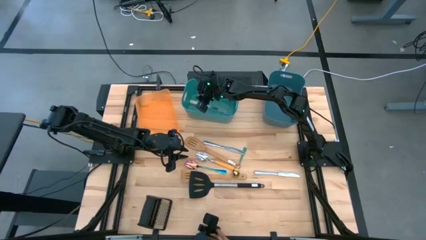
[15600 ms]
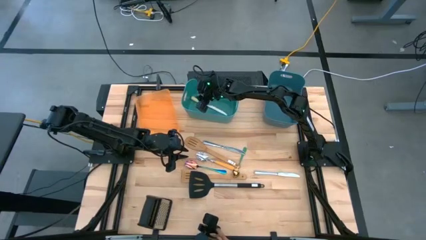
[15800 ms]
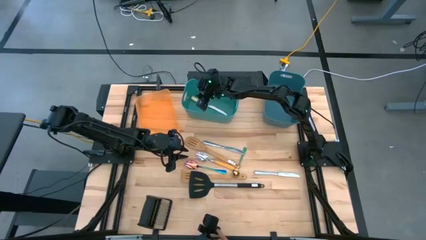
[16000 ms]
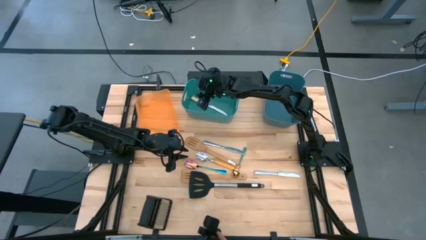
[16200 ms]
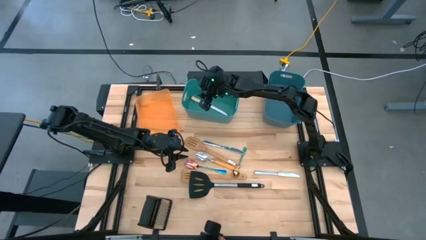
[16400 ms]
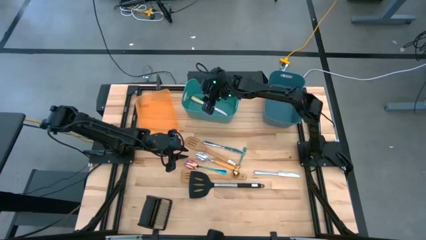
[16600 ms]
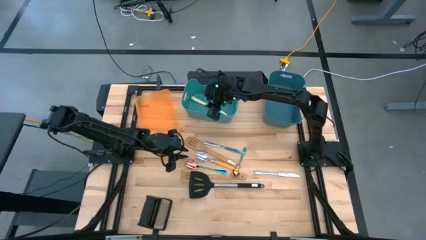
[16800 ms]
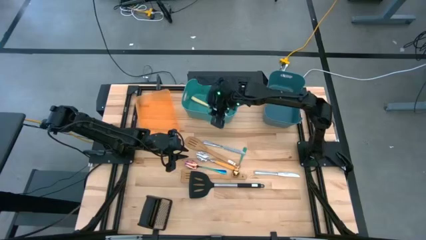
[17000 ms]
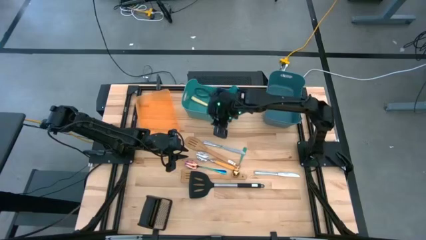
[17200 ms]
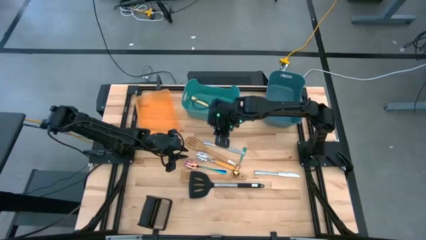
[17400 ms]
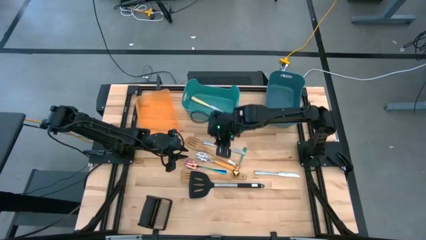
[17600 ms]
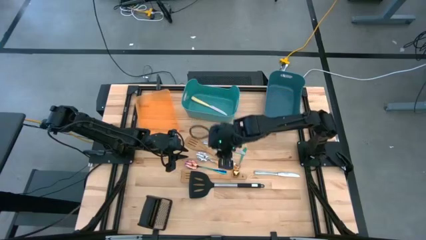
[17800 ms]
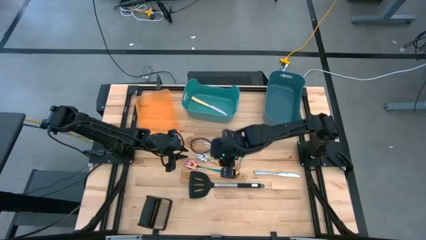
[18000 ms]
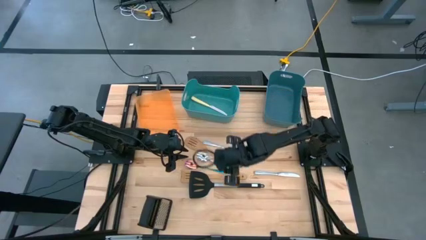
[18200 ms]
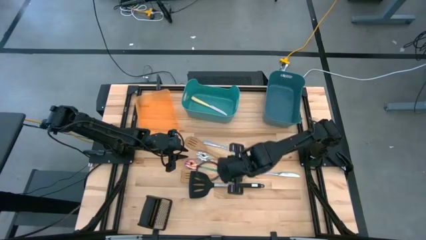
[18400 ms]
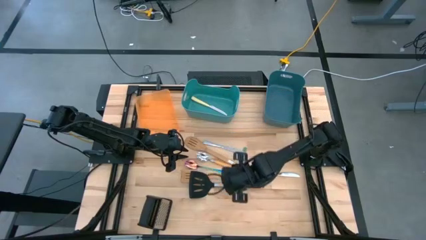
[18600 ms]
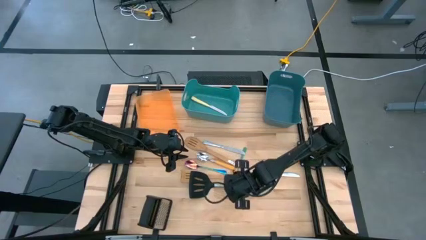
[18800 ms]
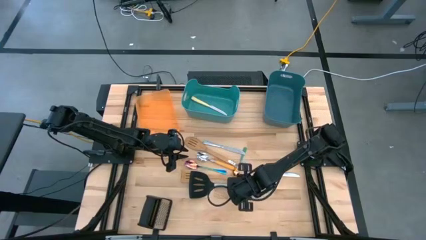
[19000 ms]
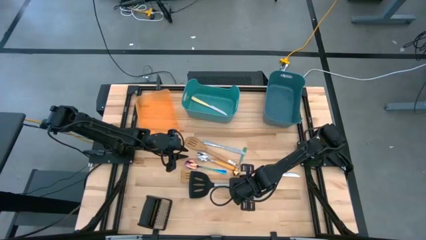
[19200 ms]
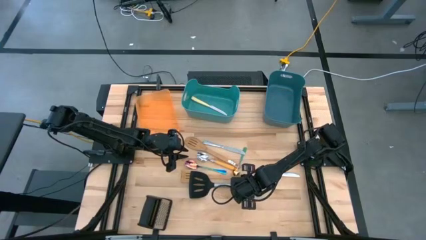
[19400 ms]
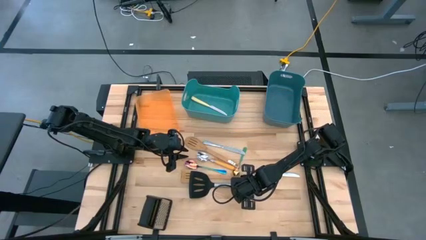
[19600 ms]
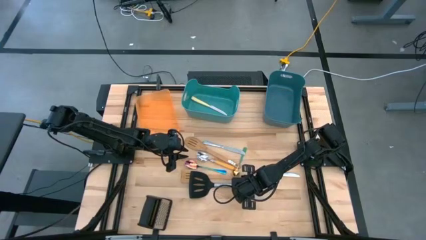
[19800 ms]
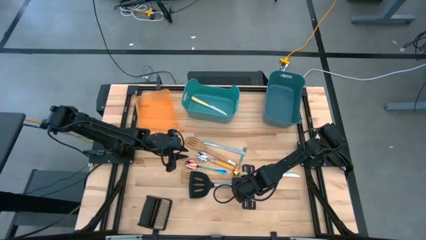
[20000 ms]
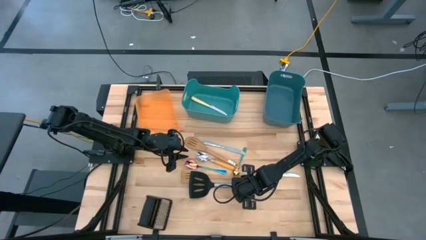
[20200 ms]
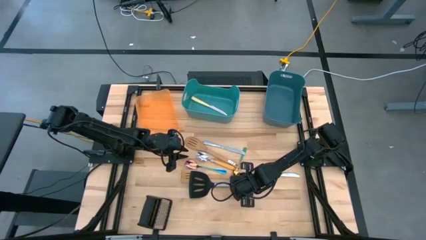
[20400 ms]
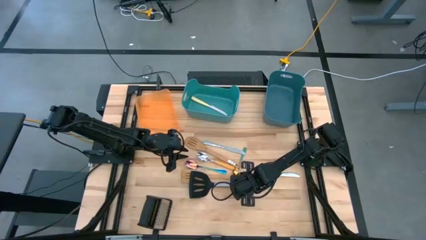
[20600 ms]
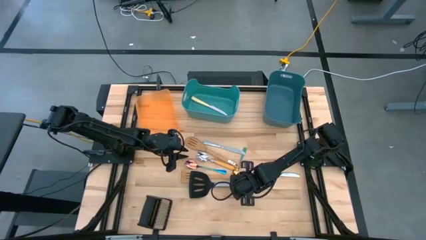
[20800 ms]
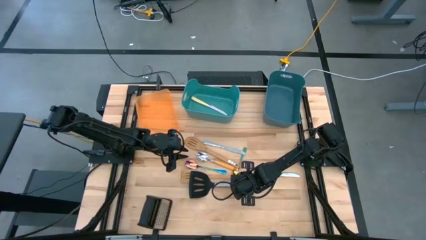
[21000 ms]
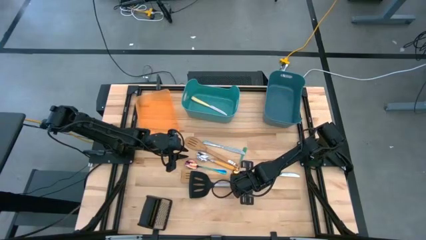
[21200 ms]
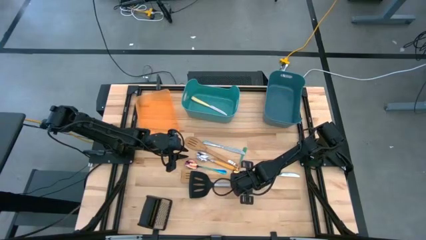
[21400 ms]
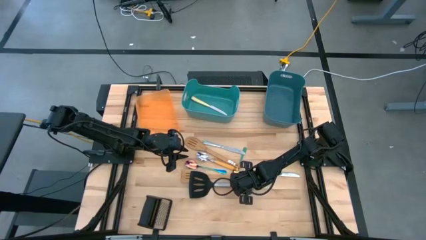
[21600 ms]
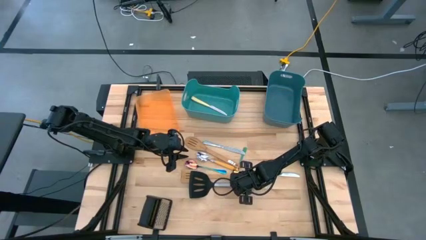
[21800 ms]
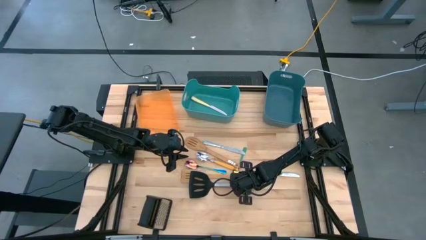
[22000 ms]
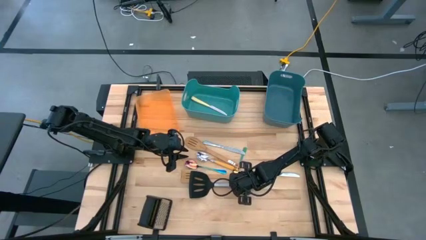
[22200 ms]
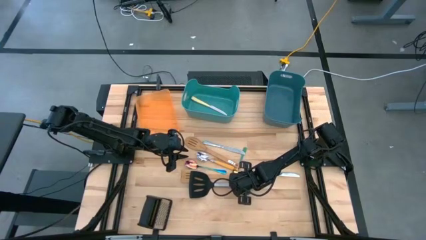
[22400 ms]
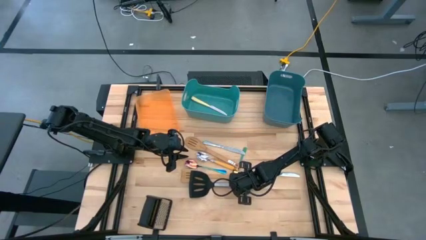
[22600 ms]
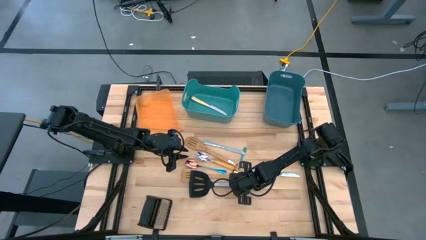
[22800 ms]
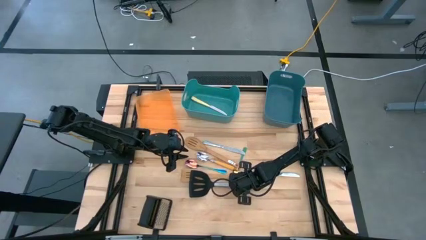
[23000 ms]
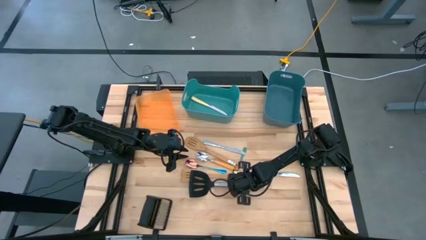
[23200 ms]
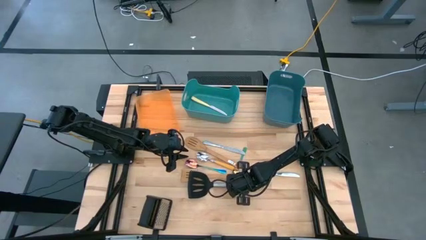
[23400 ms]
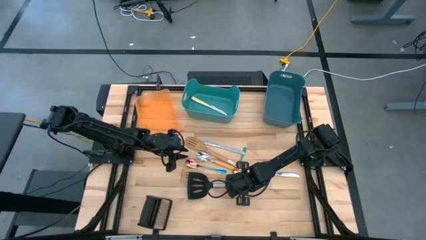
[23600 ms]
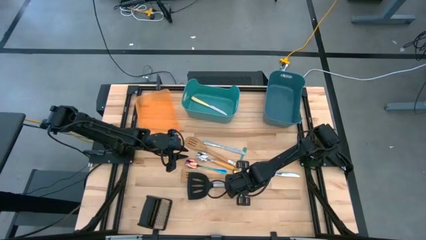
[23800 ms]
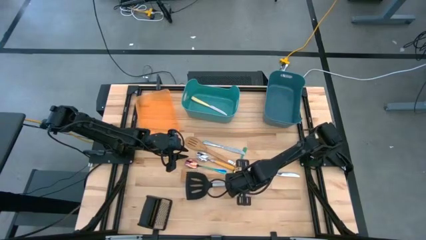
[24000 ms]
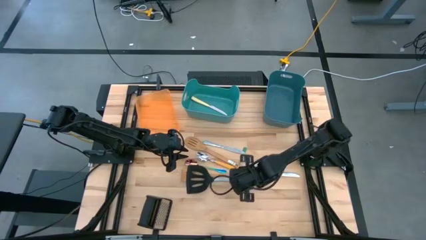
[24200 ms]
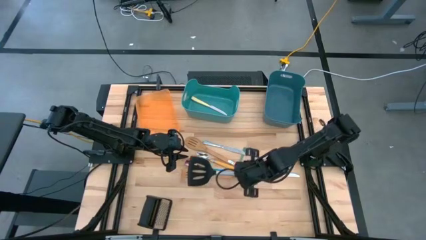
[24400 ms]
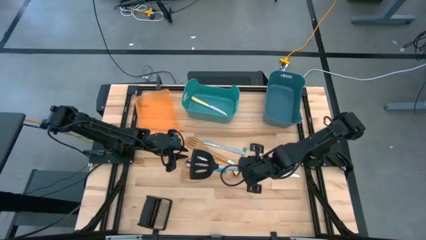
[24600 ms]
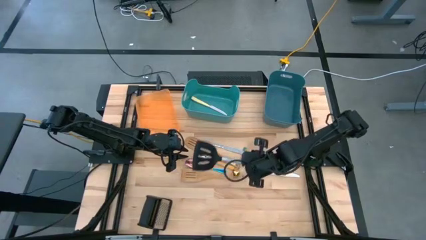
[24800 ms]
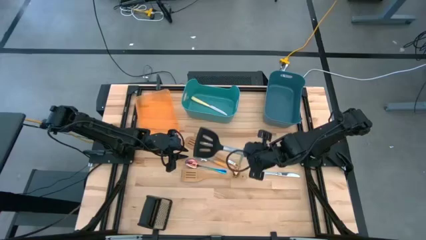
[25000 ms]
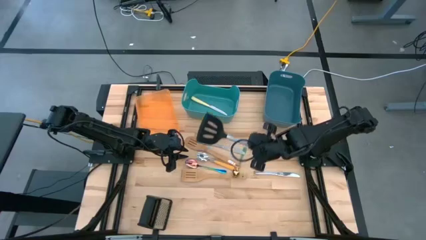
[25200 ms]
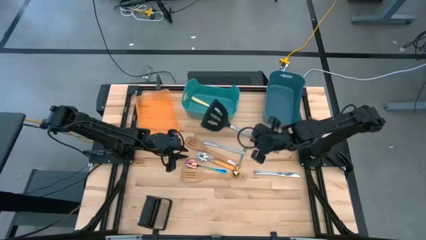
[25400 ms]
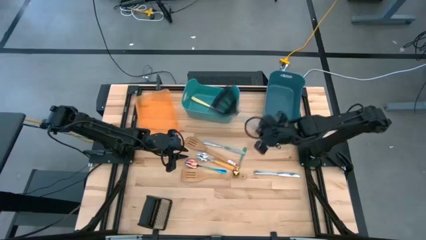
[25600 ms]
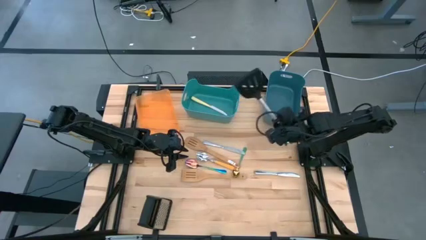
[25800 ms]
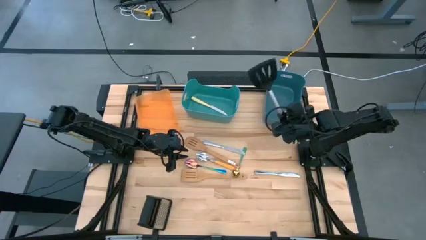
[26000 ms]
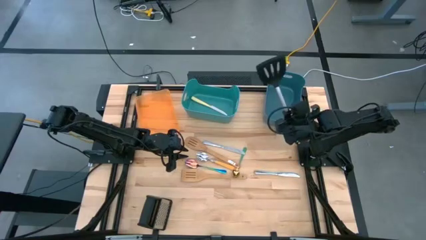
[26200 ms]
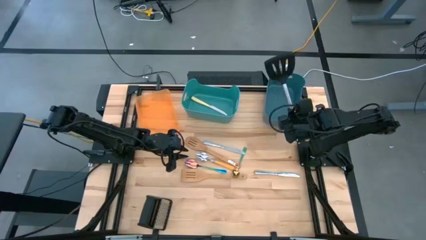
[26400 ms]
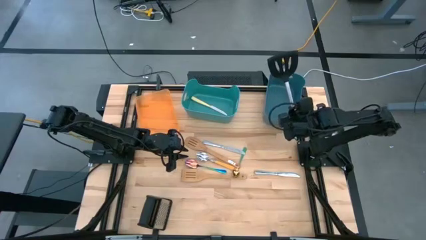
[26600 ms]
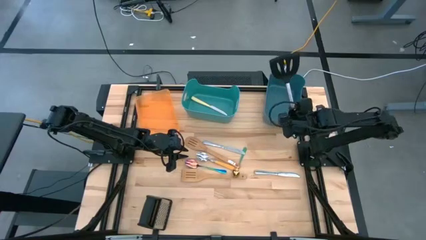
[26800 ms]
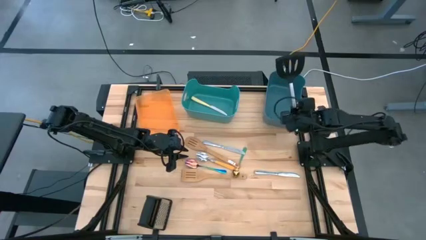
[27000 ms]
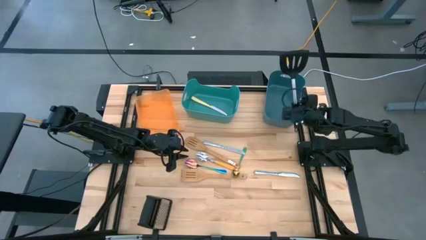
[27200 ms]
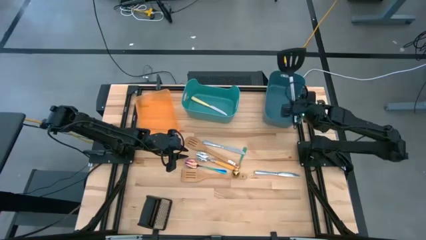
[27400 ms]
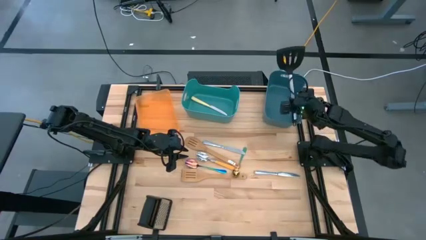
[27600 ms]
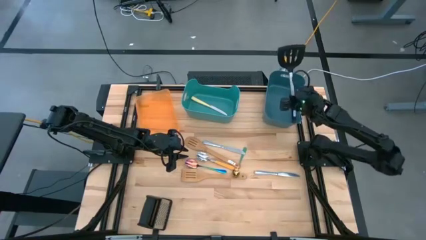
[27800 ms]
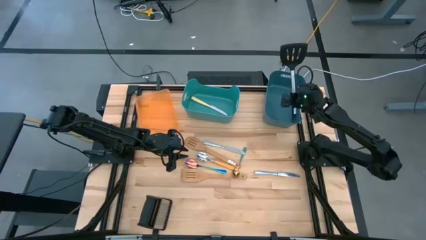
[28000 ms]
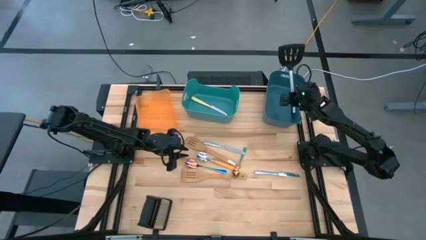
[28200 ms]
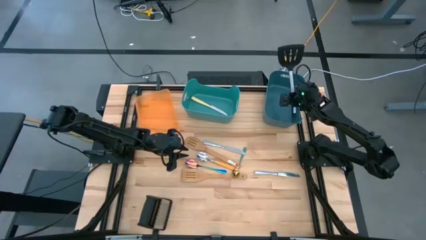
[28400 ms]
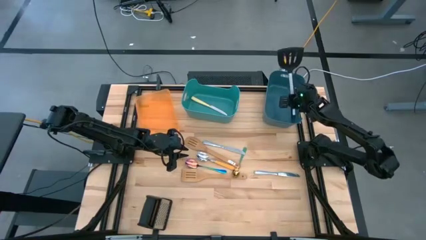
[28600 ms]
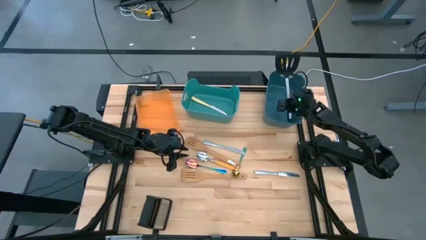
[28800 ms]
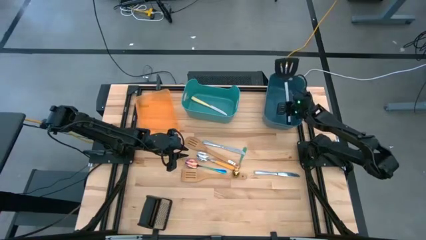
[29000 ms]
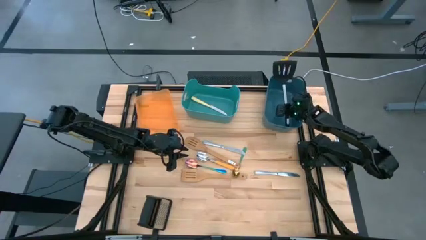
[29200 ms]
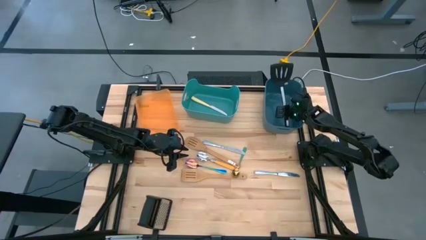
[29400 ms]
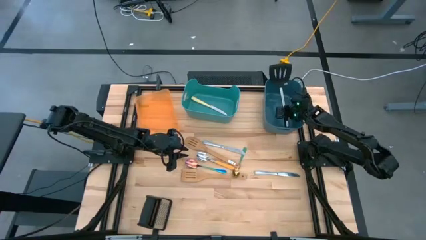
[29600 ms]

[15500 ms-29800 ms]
Task: Pick & Place Kitchen Items
Put the black spatula into the blue bin
